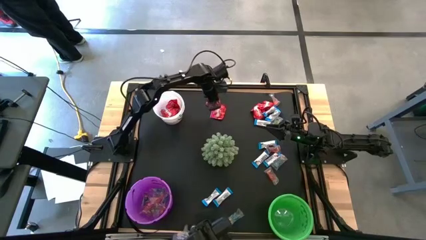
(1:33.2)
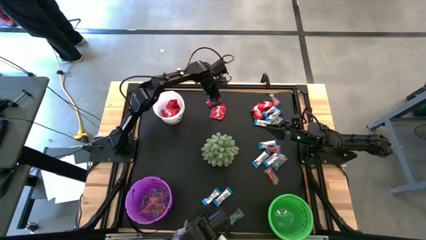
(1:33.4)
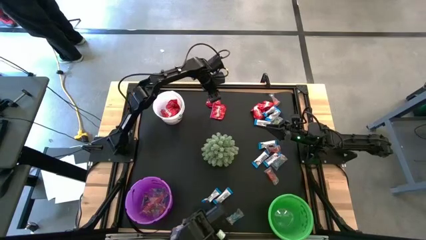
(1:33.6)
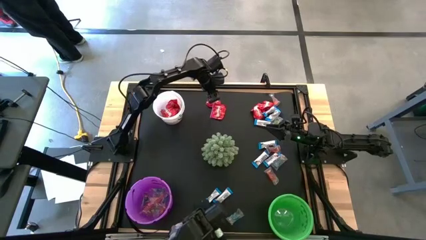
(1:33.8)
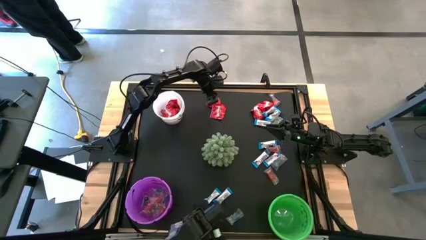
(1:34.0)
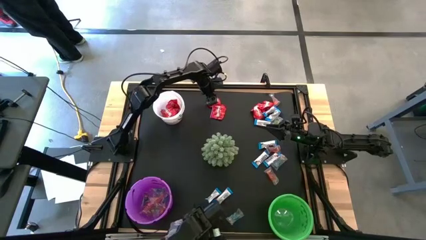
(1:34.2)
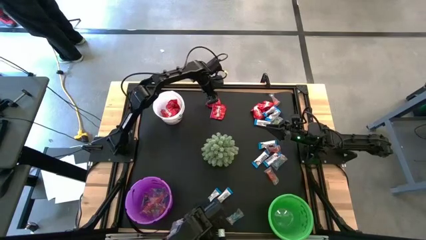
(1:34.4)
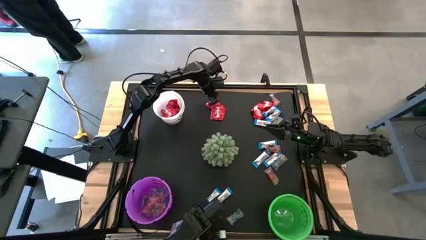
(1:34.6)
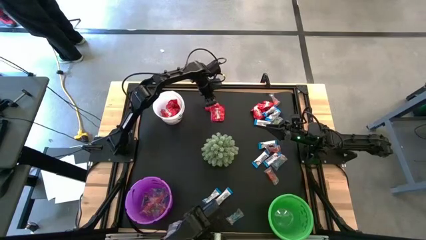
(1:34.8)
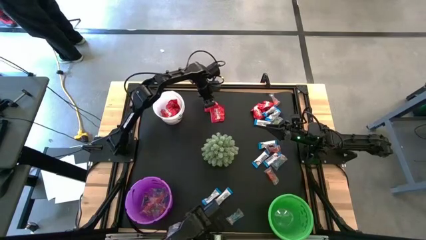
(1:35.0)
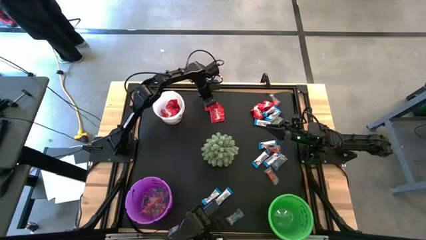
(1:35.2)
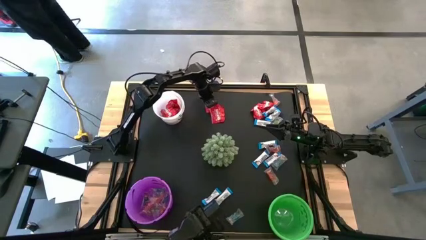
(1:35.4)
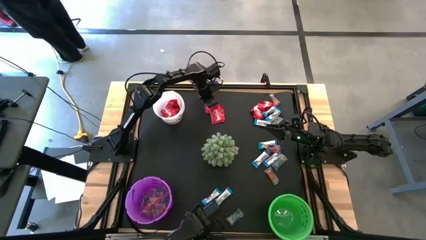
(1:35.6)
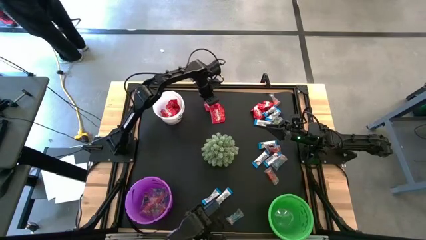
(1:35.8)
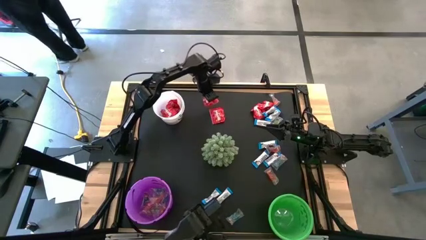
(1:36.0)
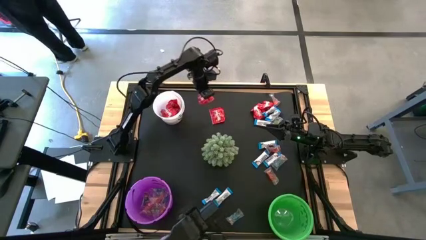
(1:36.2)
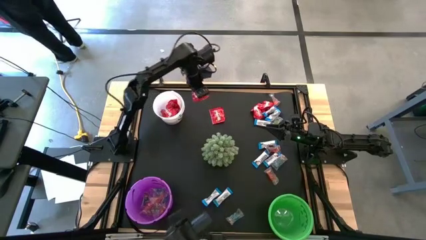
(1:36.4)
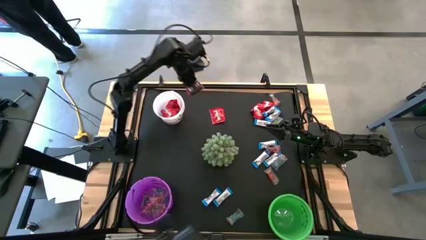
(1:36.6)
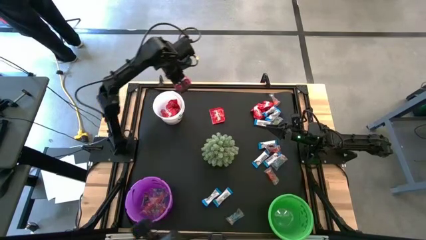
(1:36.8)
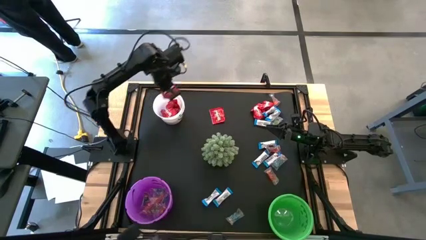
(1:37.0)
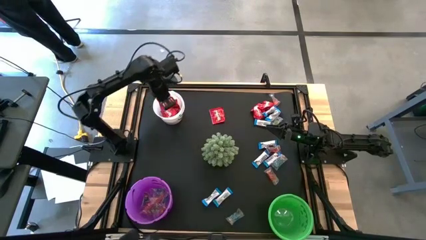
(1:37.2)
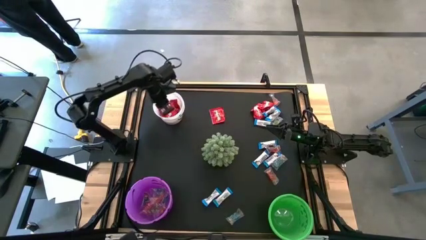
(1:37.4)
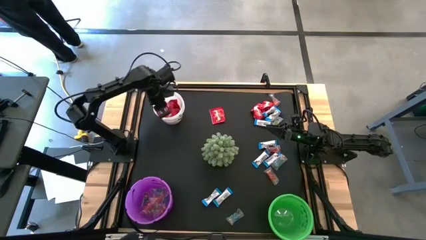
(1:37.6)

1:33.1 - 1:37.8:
Task: Organize candy in baskets
Put the red candy into the white bucket

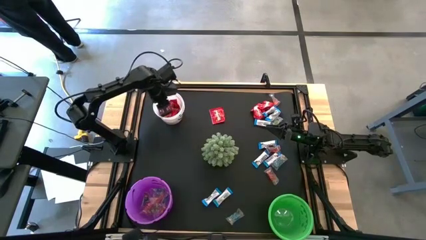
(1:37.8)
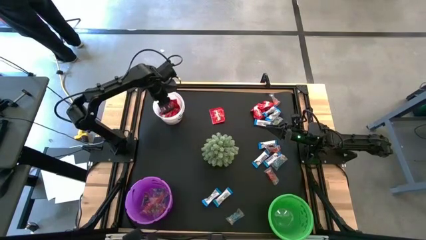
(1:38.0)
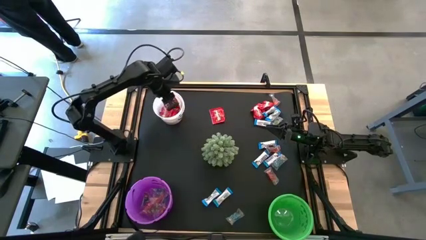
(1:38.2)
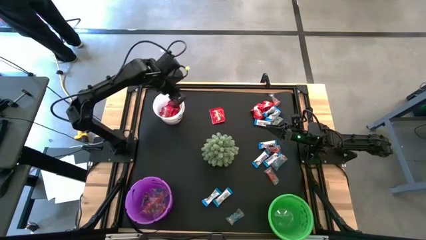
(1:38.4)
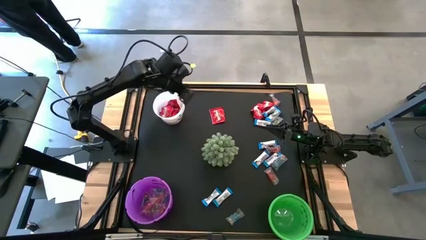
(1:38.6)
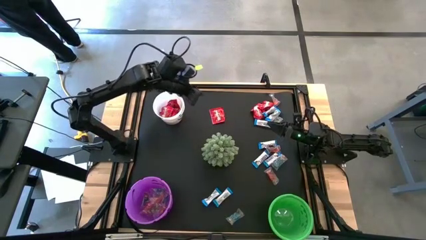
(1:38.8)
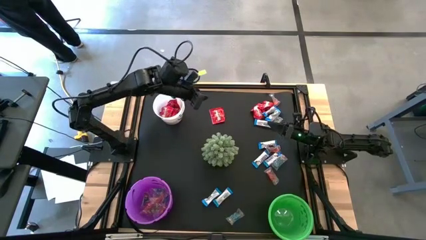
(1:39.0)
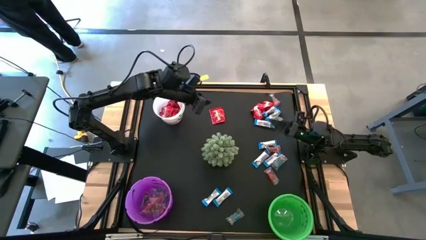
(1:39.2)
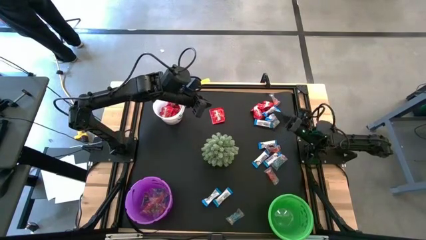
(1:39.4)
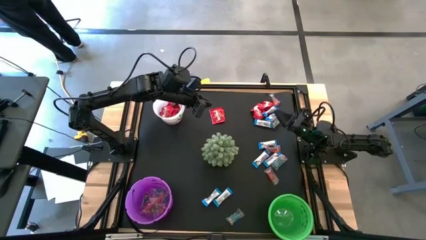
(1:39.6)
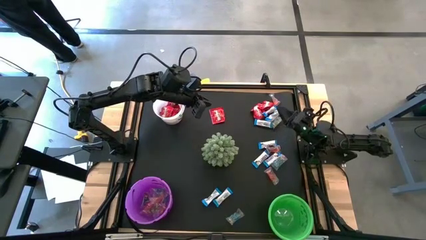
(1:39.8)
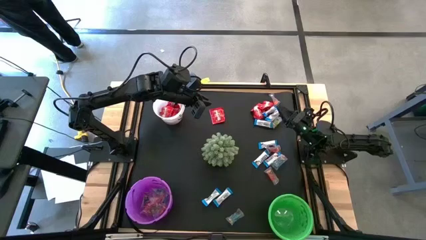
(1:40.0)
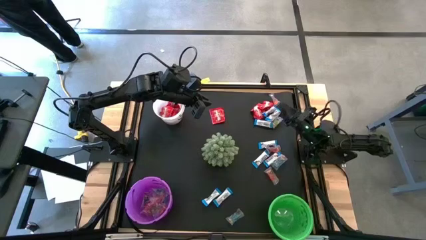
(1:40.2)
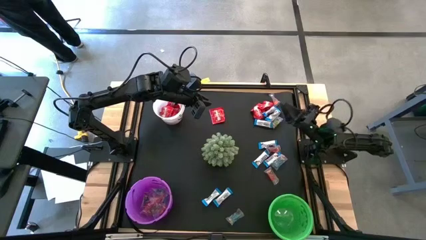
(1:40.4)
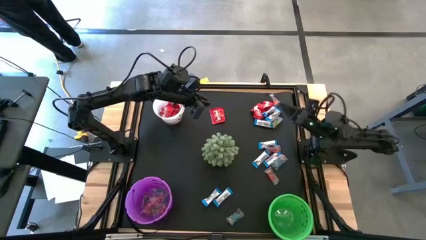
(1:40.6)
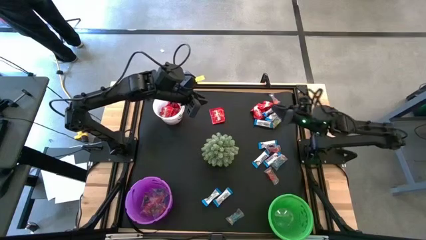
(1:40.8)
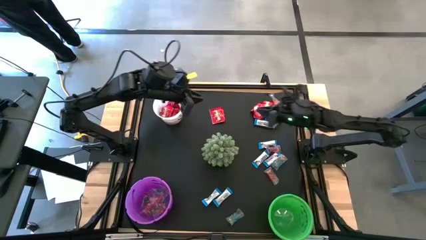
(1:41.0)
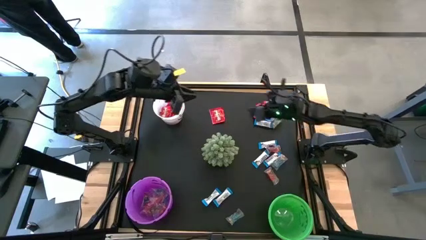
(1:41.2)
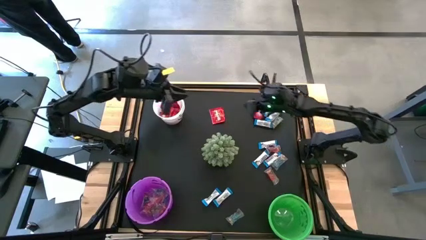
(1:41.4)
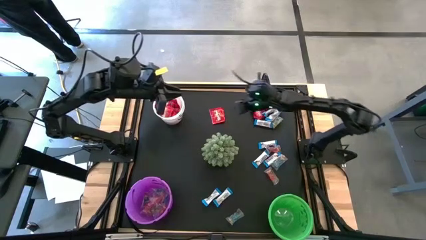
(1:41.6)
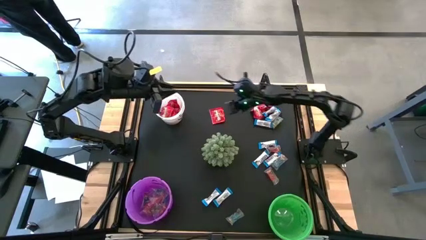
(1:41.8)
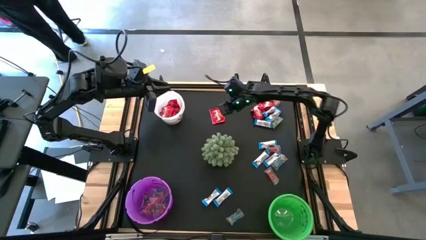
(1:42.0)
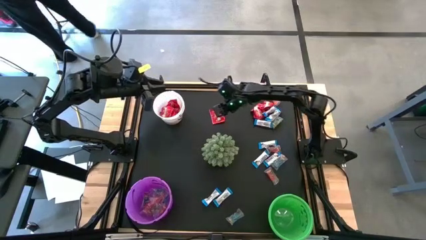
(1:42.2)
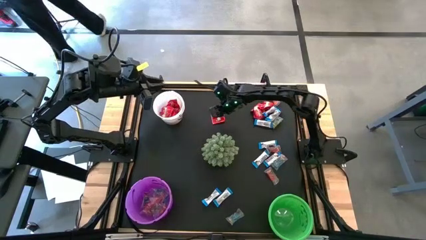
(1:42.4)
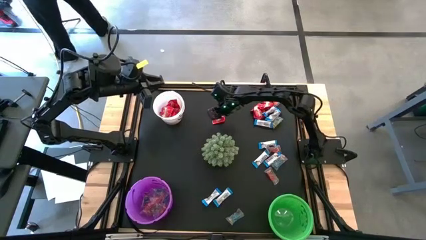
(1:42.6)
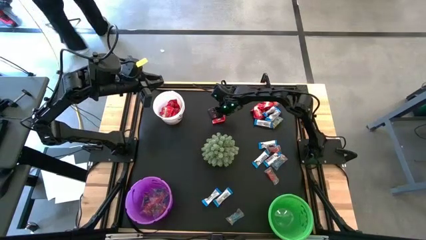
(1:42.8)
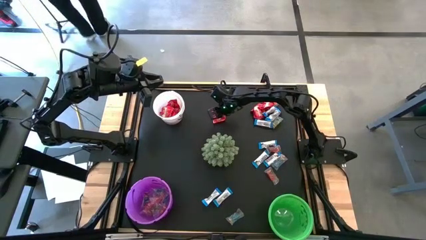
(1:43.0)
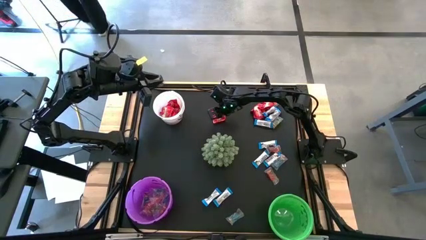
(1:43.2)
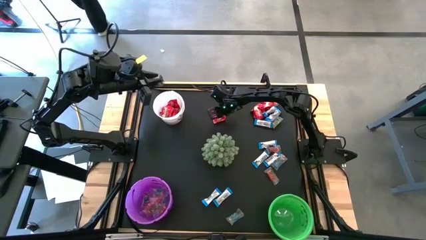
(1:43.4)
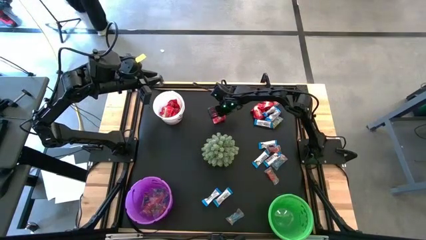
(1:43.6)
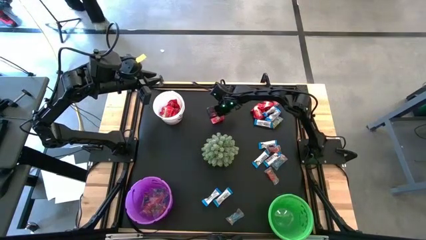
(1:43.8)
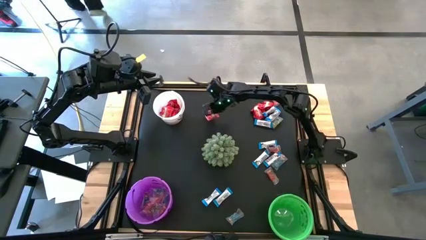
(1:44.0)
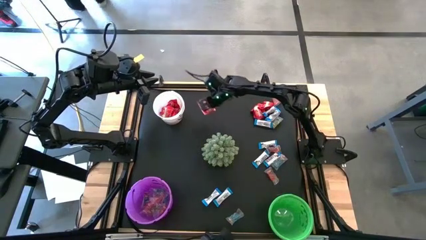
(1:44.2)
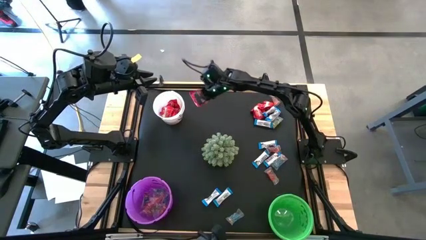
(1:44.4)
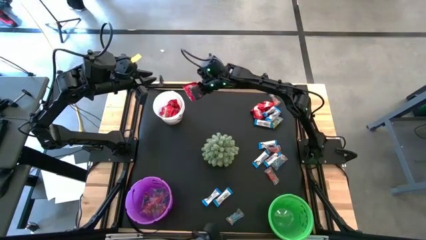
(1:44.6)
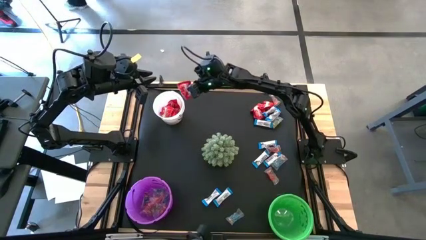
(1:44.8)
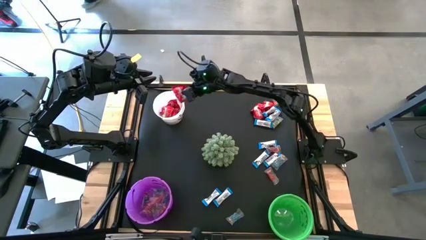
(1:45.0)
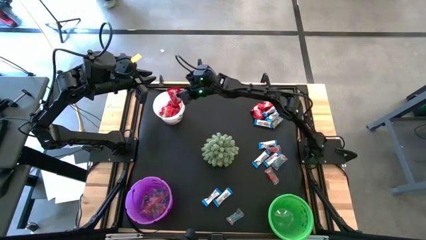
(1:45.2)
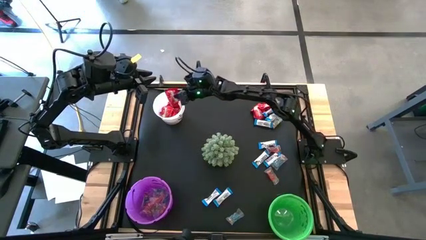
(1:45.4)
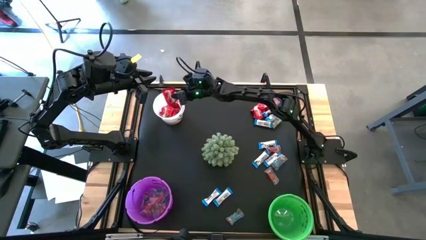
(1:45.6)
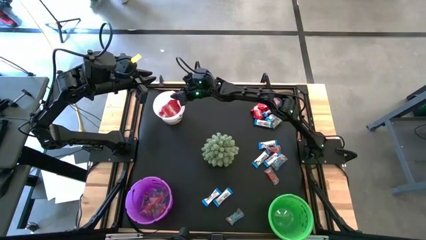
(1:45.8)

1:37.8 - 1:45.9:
Put the red candy into the white bucket
